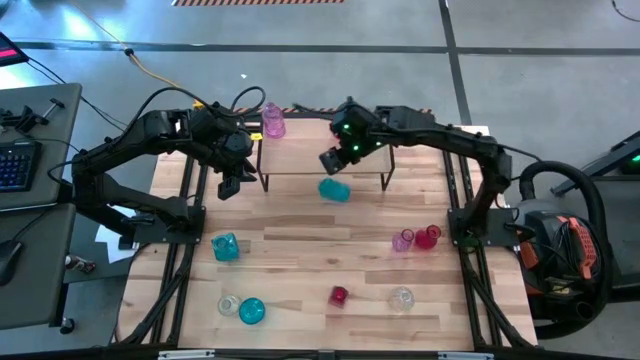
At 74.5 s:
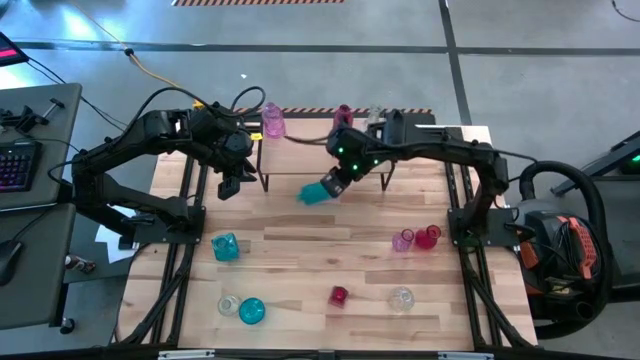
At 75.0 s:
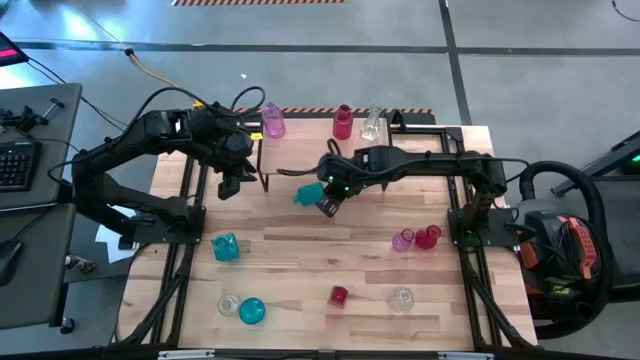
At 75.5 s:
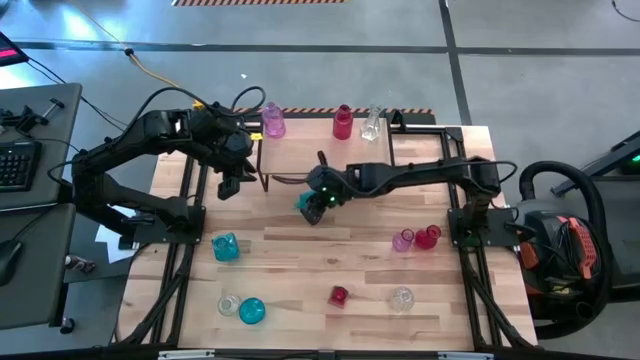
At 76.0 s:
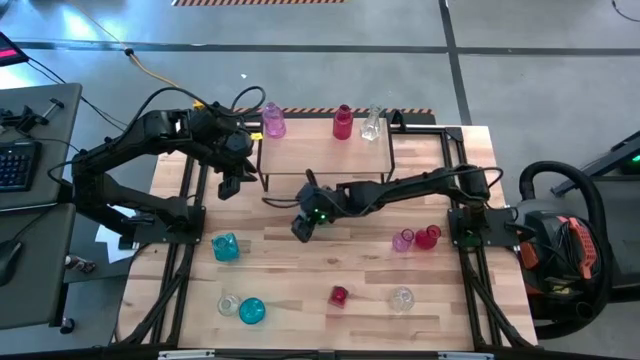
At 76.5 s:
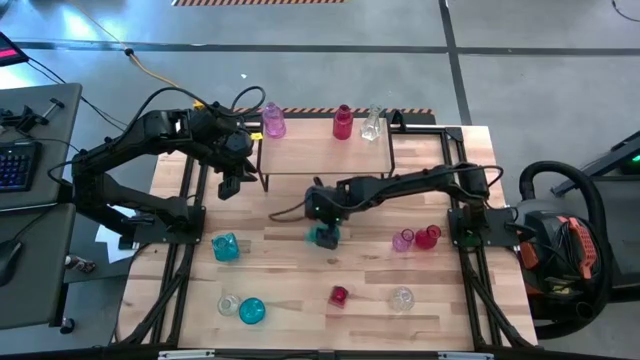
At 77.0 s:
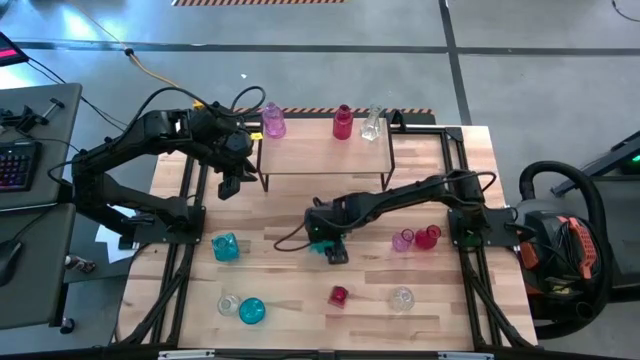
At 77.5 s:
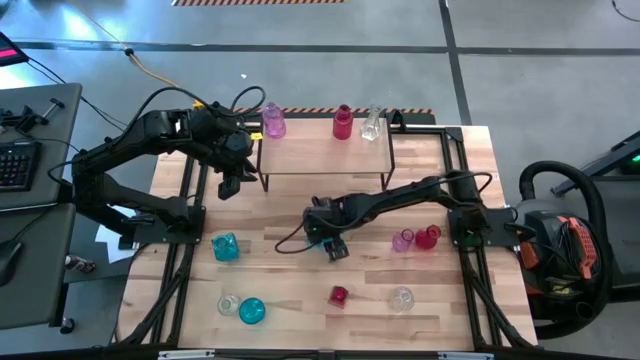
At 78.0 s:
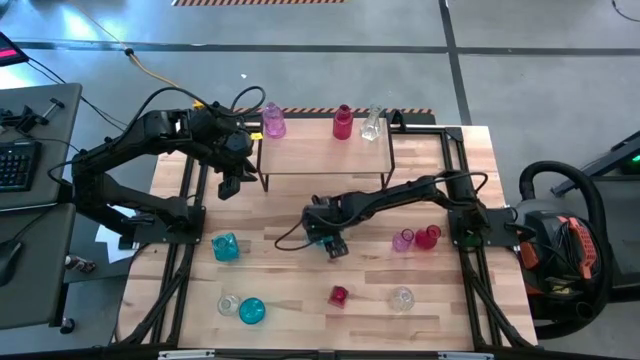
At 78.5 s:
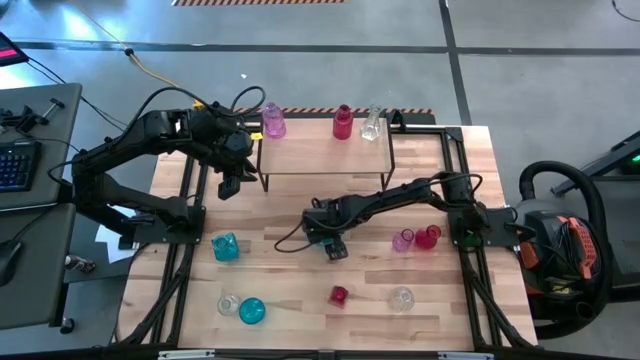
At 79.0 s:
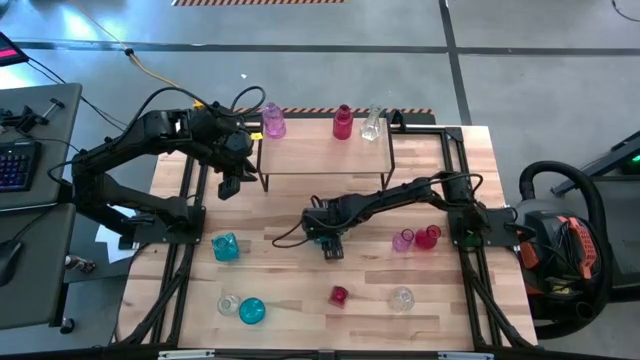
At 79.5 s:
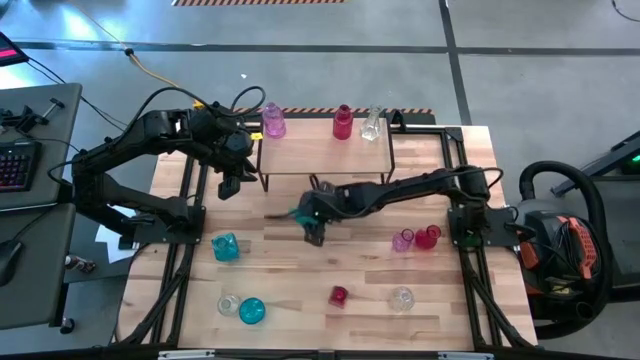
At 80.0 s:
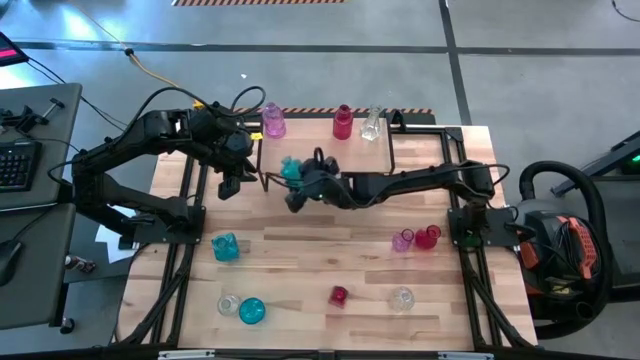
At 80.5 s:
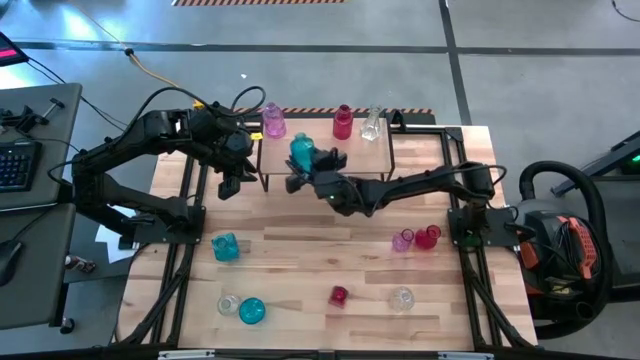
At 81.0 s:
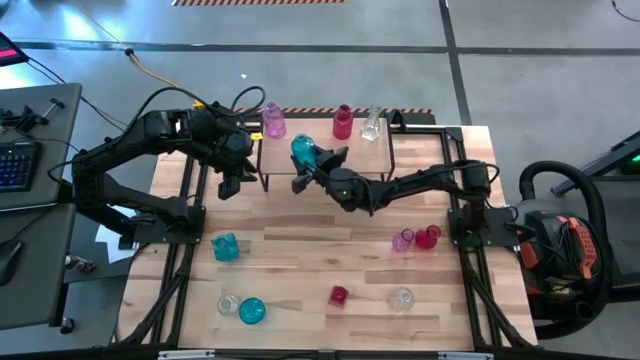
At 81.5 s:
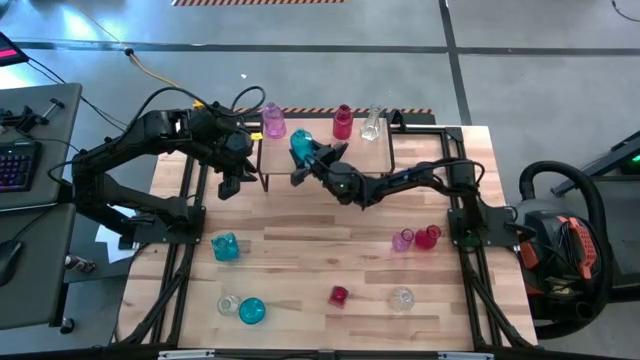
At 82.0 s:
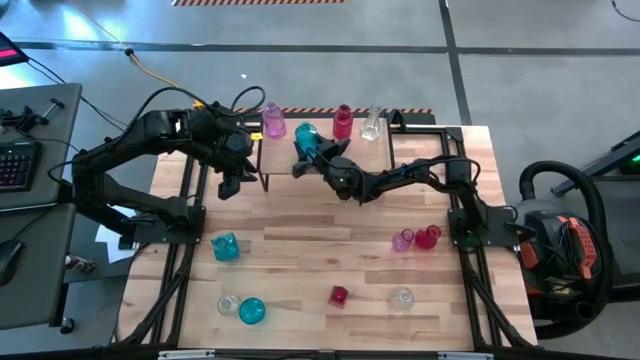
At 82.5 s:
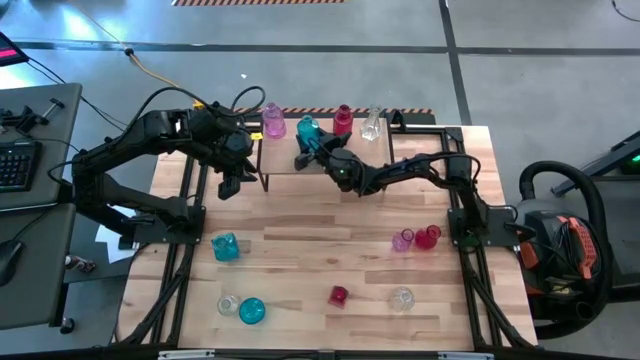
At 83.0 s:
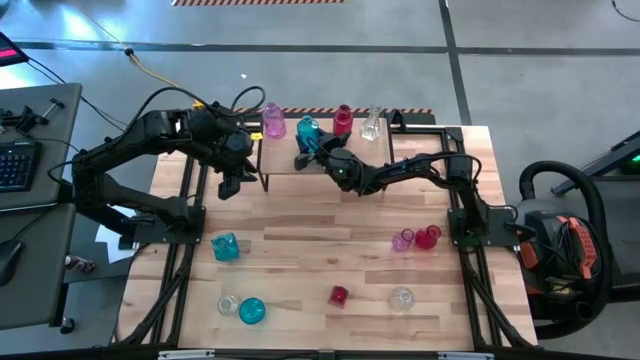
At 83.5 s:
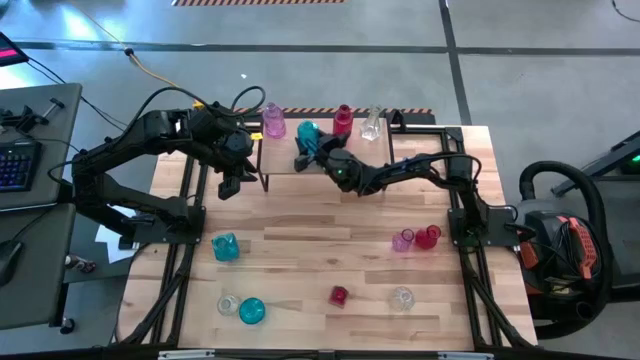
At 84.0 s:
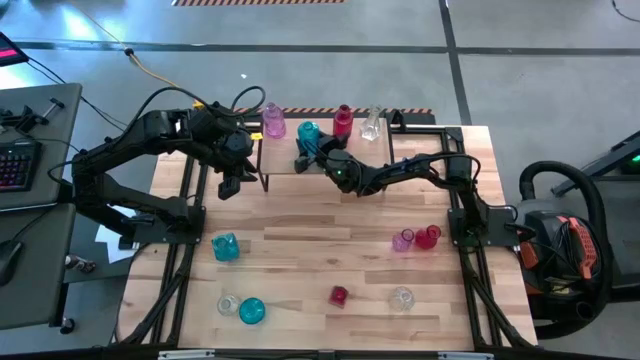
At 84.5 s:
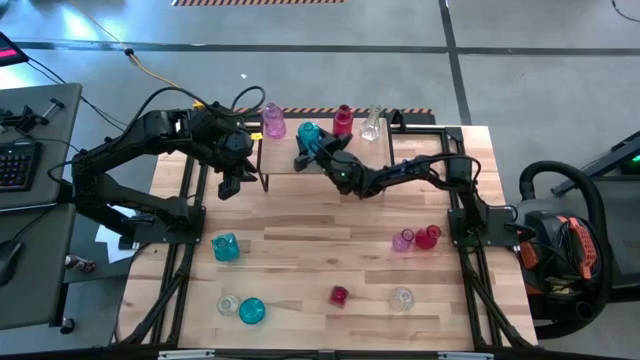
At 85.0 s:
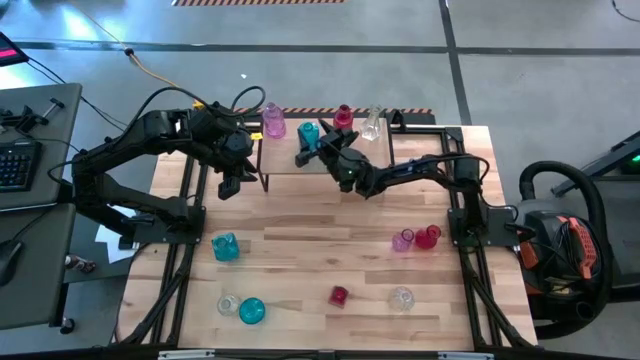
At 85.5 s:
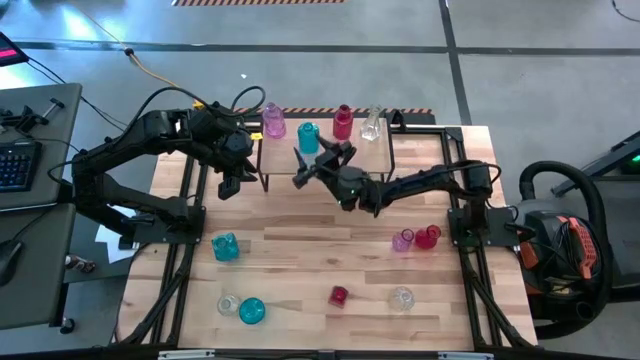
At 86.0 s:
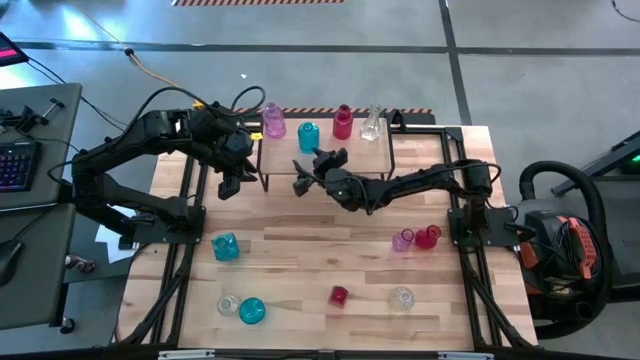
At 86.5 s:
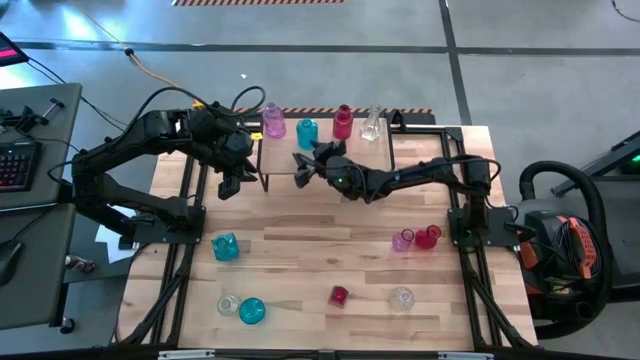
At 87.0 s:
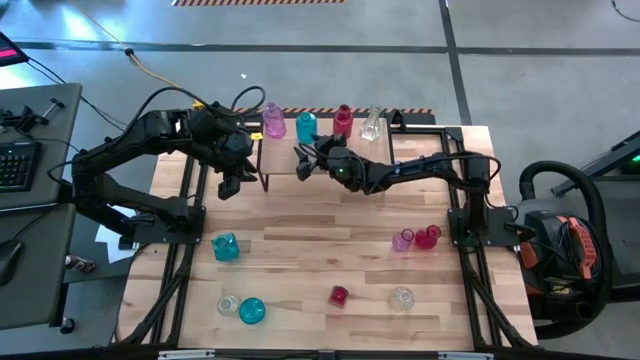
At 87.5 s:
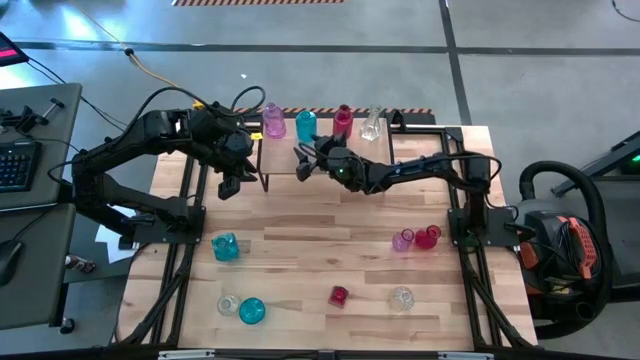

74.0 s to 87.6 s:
Task: sort vases onto shelf
Put the bottom right blue vase on the shelf

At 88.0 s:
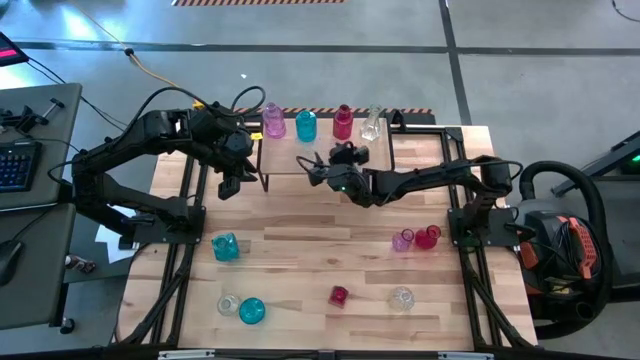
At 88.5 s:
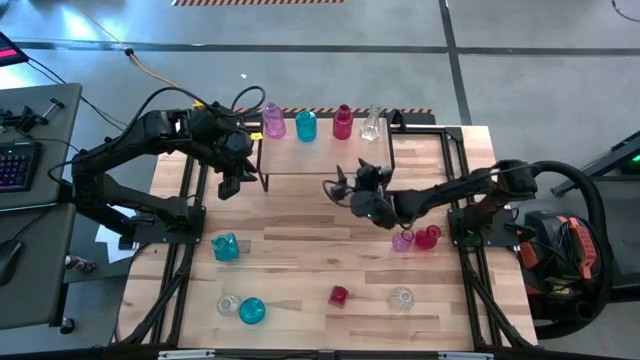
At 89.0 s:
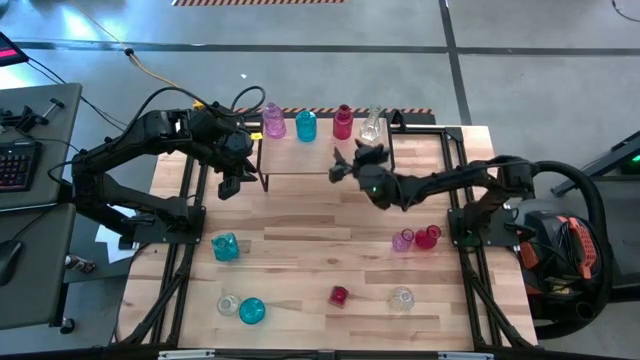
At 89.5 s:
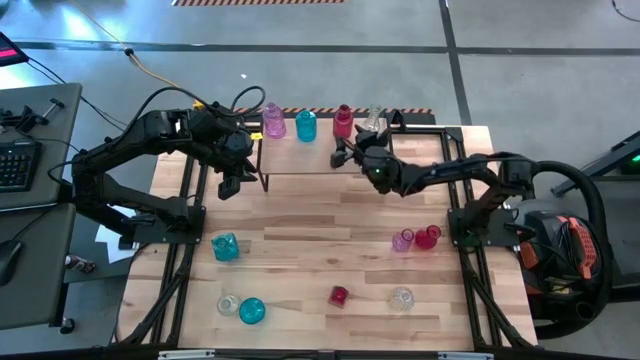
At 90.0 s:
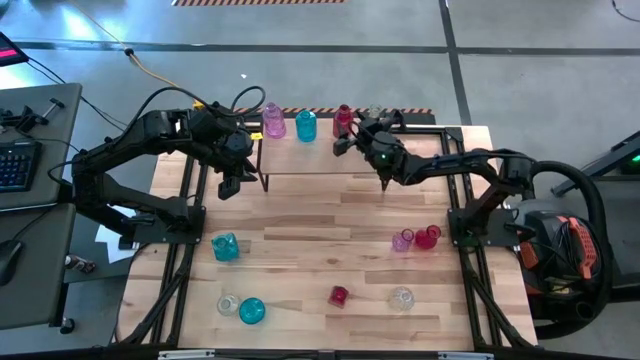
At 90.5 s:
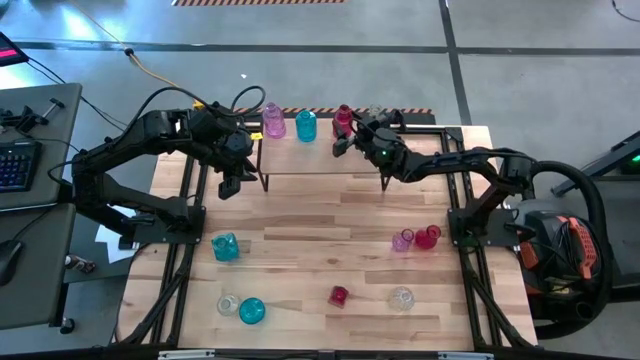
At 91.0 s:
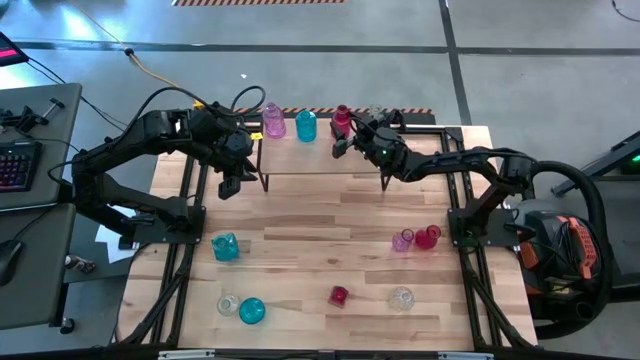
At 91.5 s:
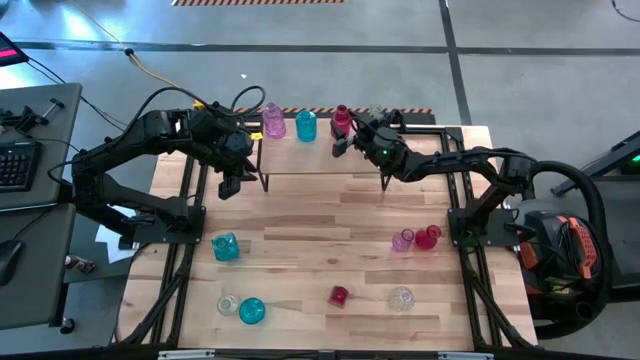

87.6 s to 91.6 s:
Adjust the red vase on the shelf
